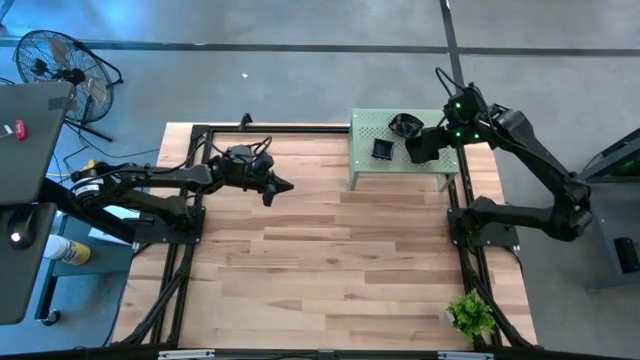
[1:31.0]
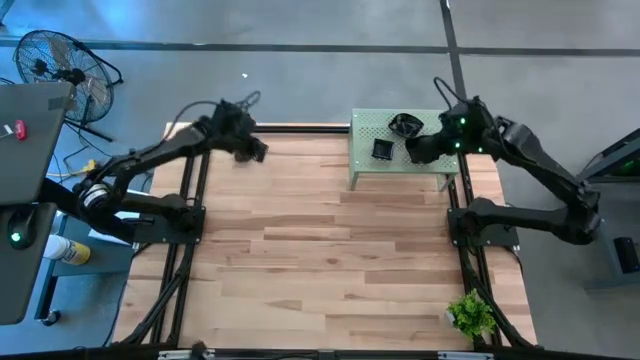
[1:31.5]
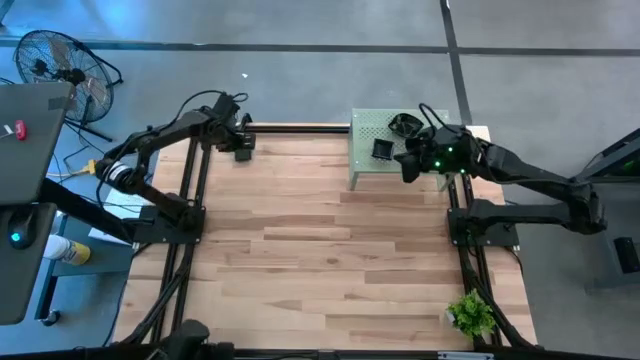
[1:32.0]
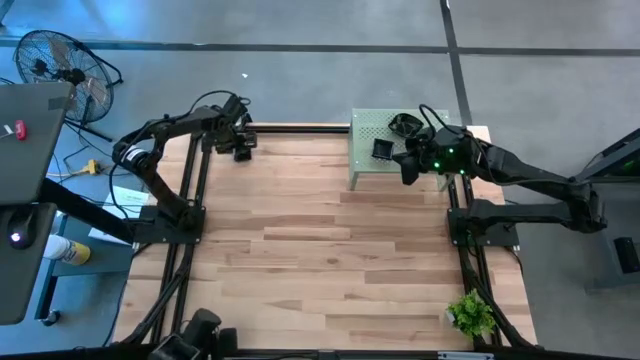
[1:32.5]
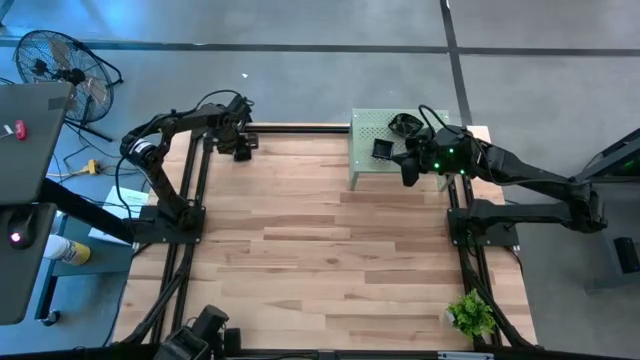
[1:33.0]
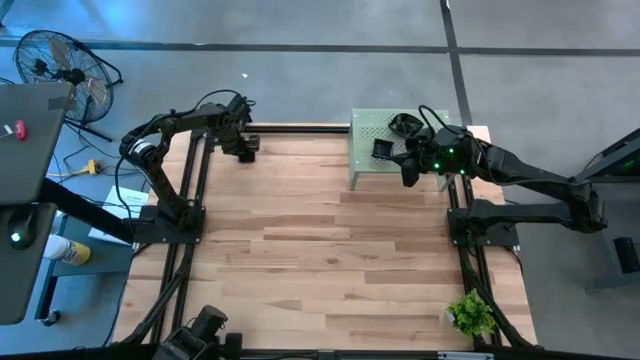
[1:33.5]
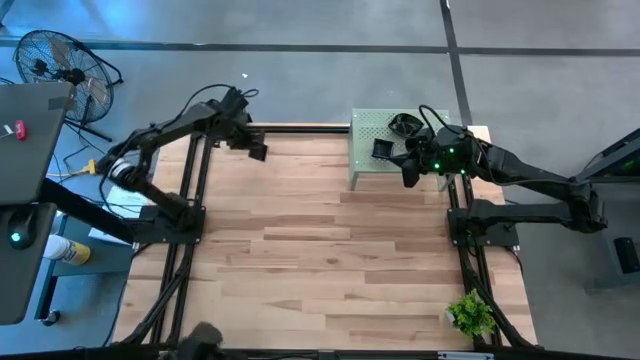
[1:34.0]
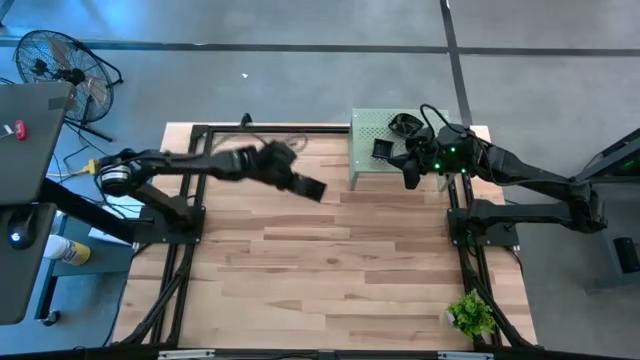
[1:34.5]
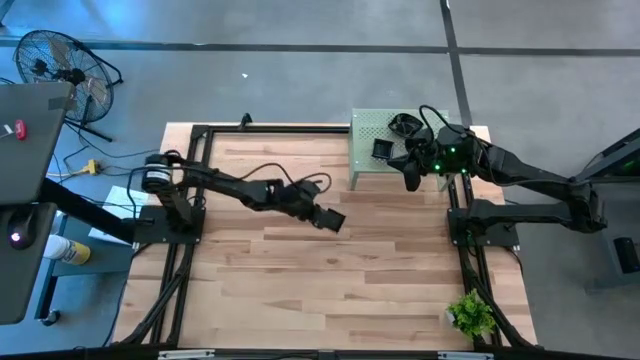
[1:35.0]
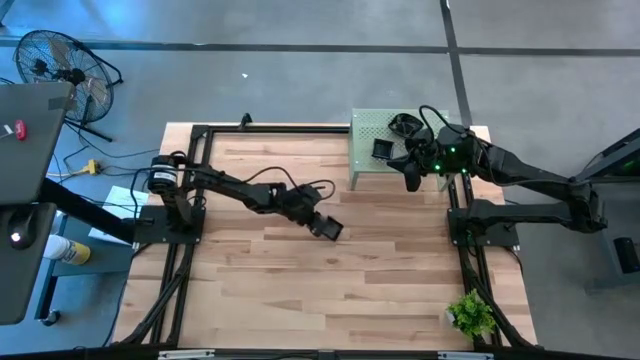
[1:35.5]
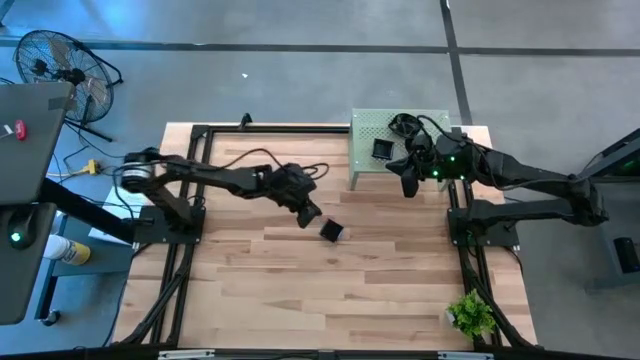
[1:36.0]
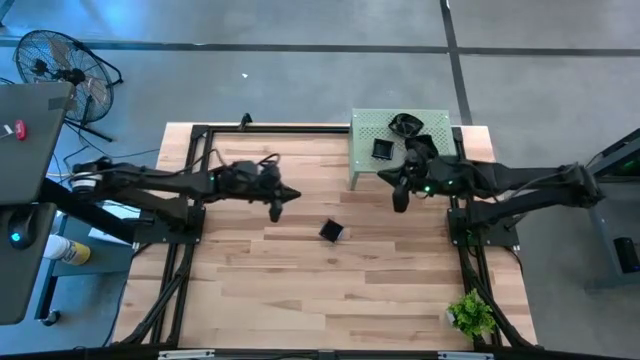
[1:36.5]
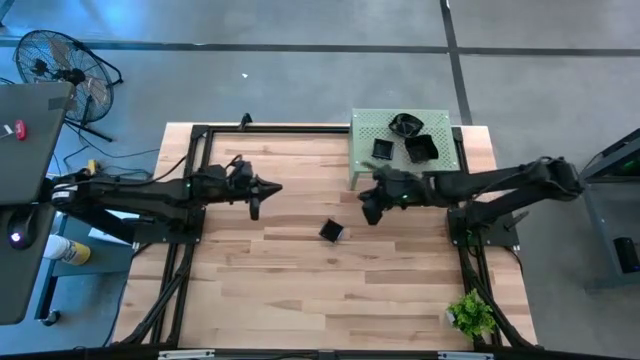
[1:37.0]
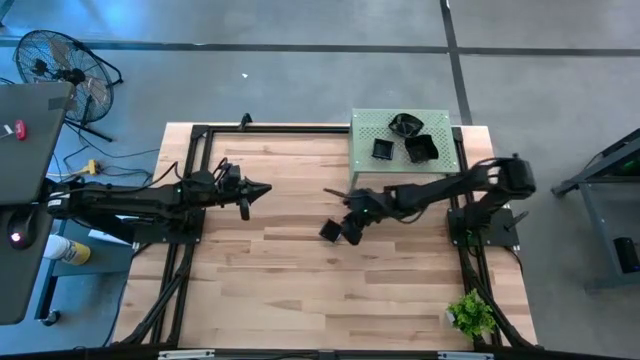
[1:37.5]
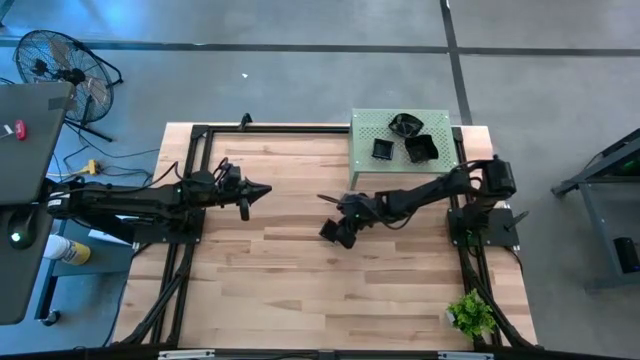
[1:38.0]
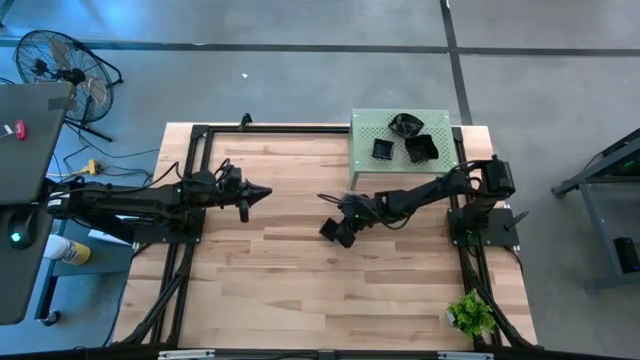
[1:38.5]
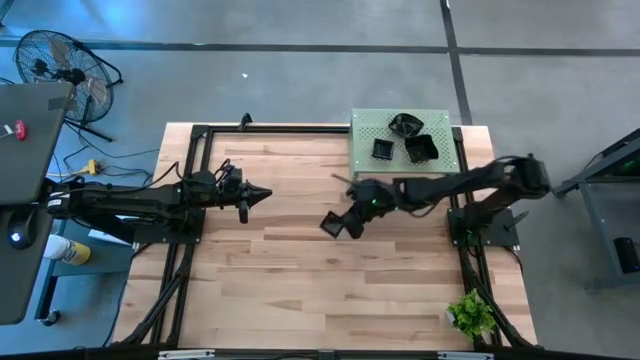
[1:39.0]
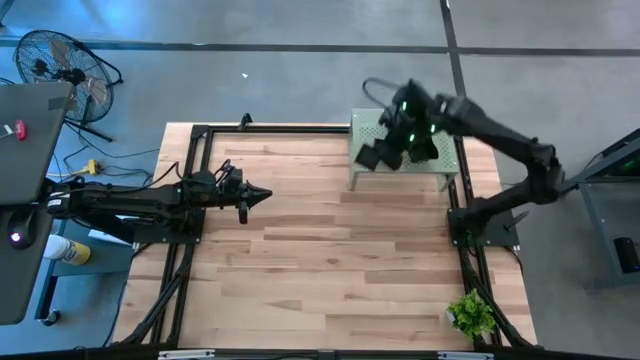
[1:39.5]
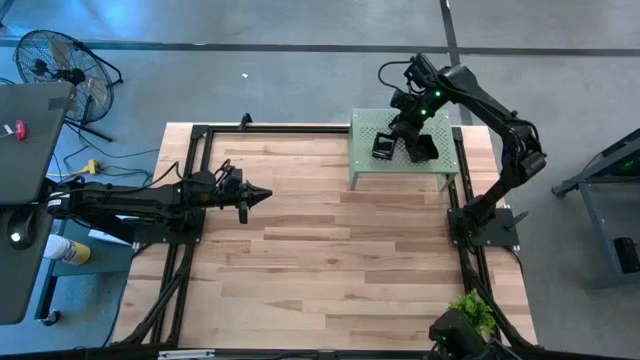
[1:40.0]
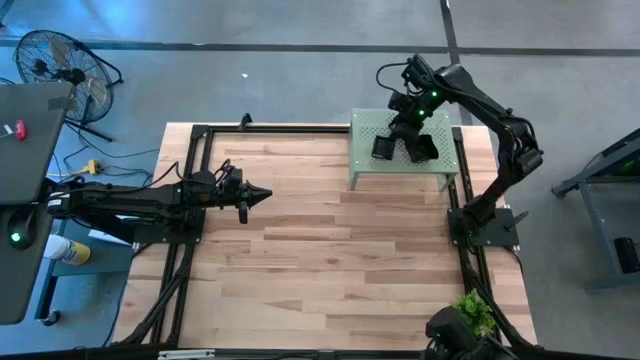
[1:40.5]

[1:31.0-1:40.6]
Task: Pick & Place Mini shaped plates
Stack the black square plate on top of the black square plate on the shelf

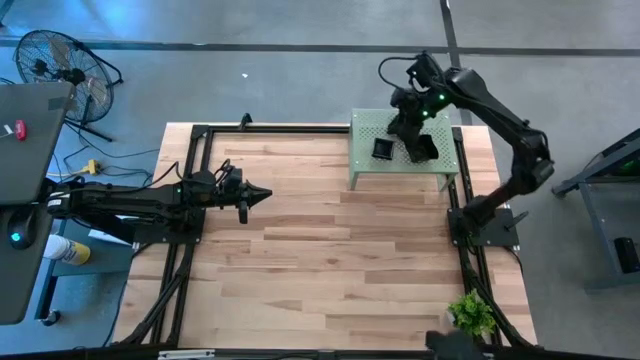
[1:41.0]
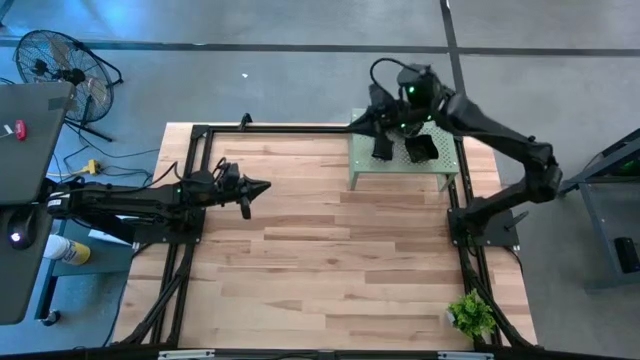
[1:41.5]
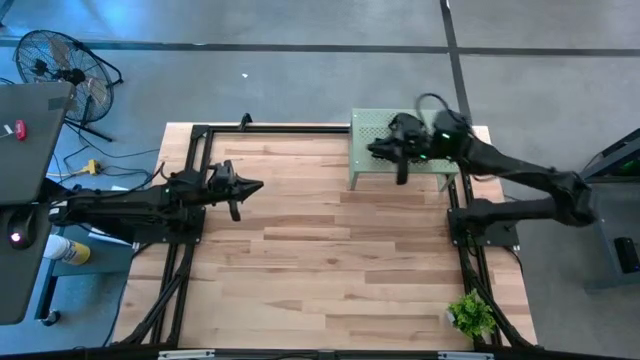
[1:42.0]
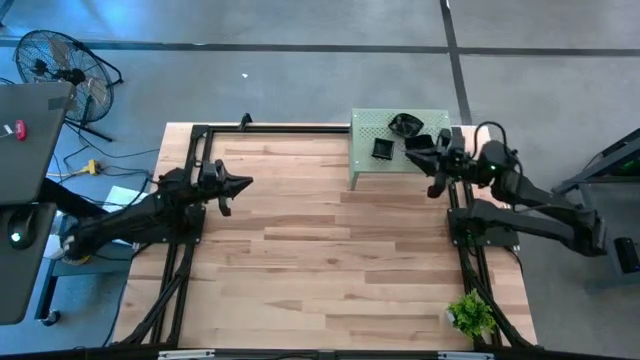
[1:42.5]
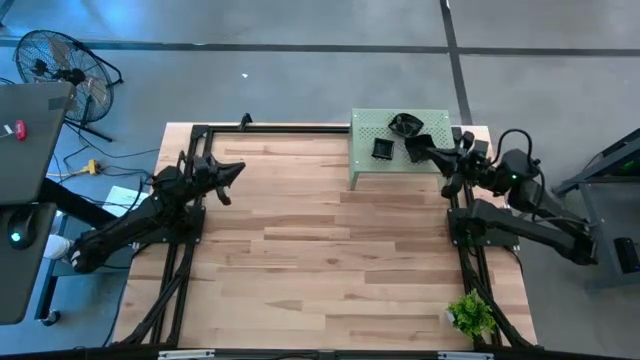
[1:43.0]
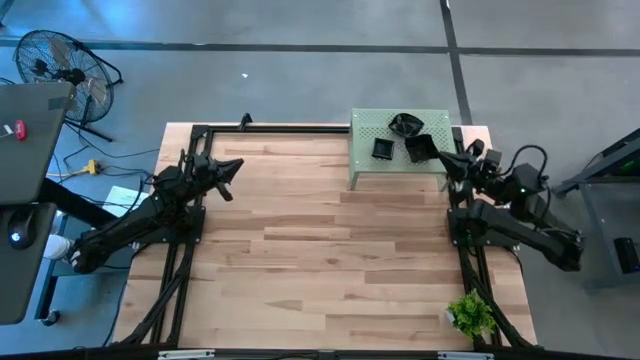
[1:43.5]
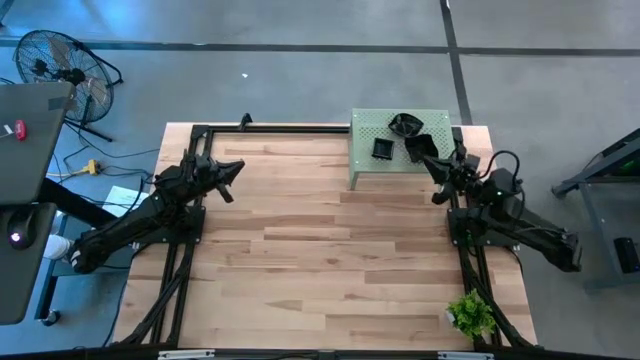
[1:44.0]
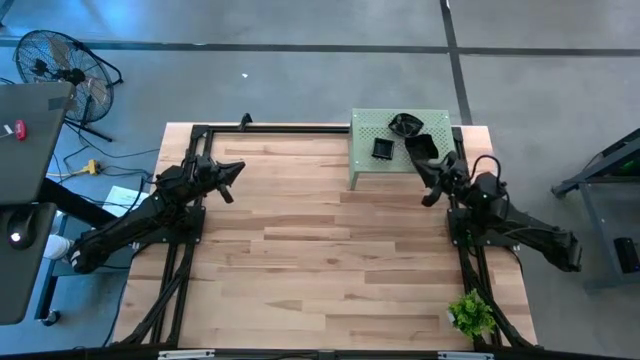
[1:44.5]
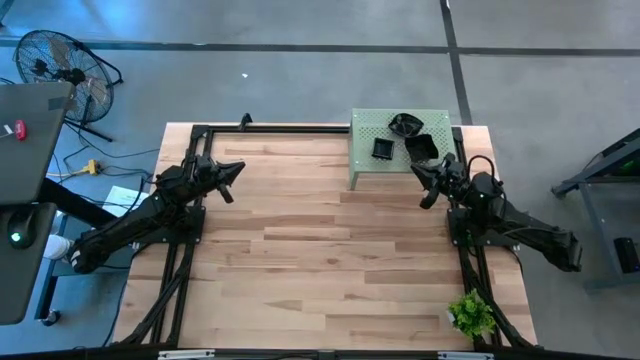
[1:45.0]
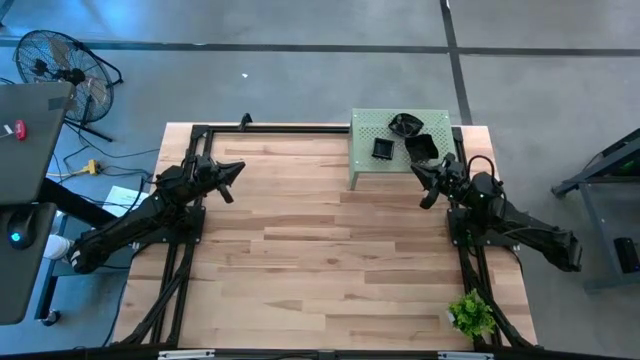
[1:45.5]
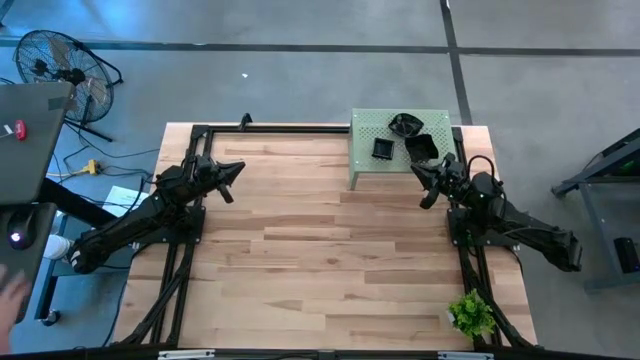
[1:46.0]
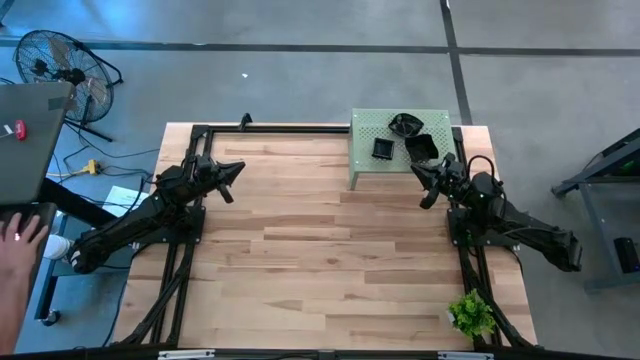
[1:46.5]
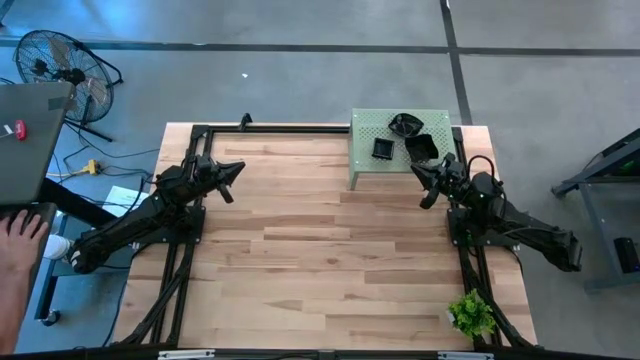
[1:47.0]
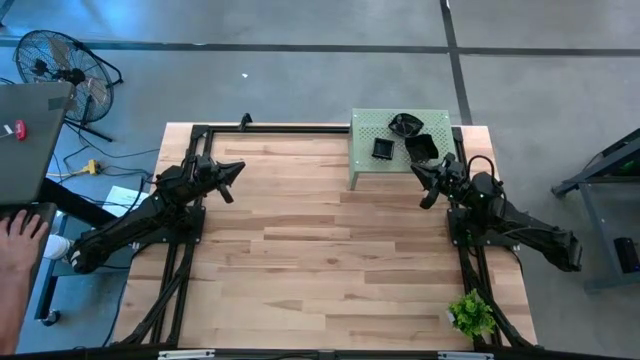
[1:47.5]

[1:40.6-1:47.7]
Return to Home Position

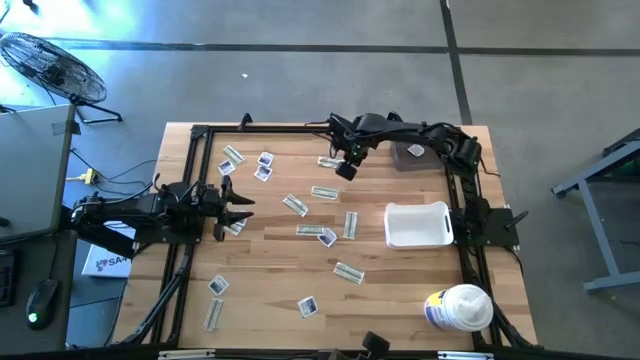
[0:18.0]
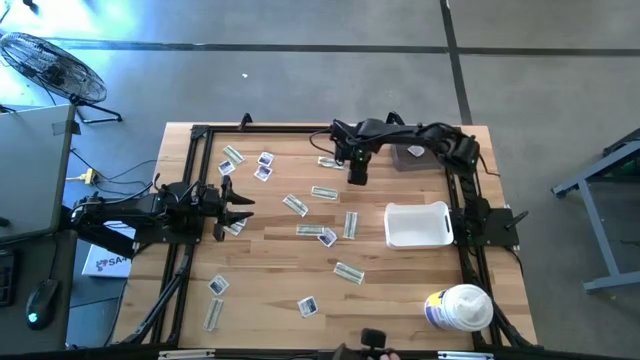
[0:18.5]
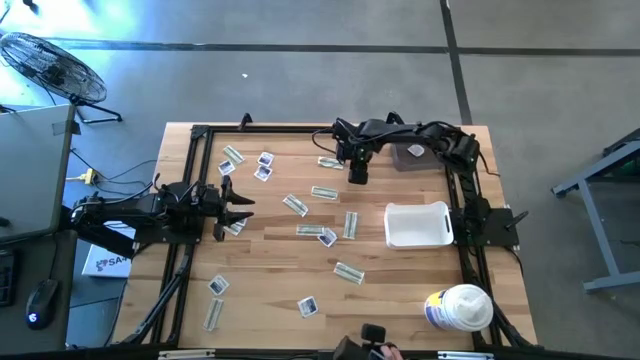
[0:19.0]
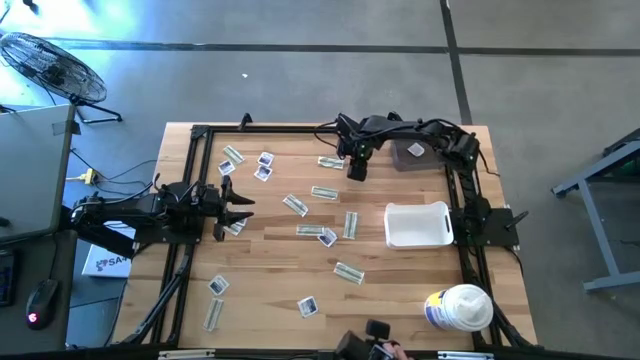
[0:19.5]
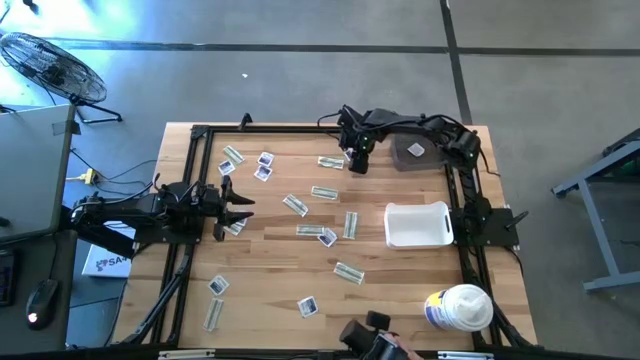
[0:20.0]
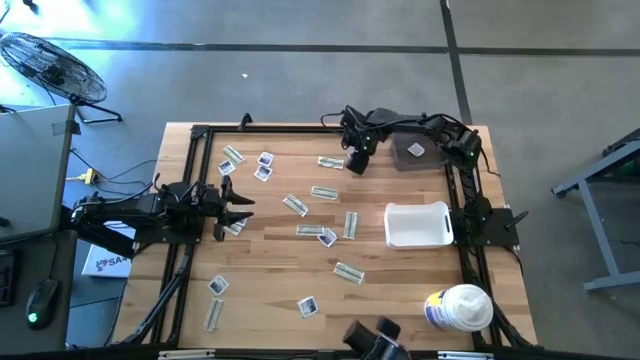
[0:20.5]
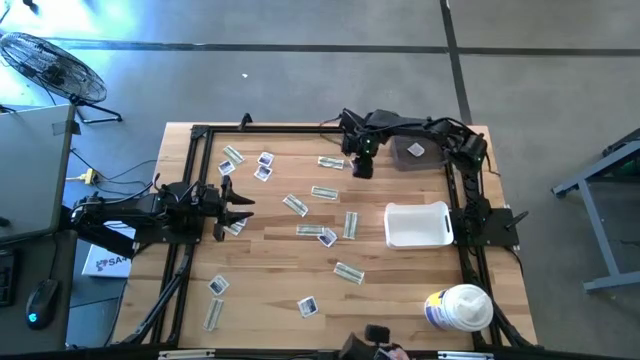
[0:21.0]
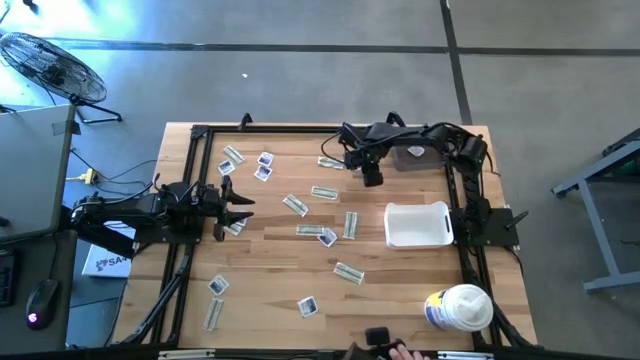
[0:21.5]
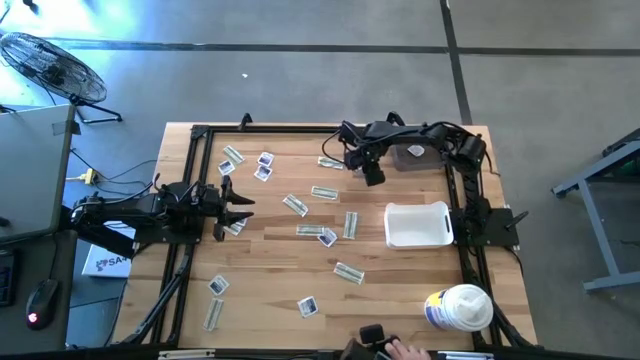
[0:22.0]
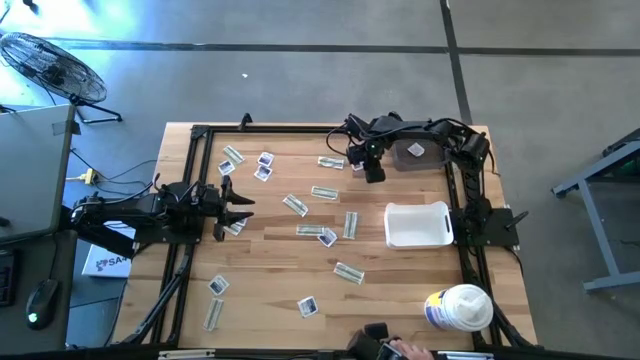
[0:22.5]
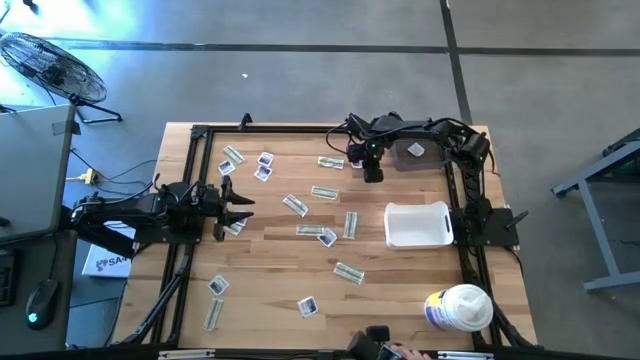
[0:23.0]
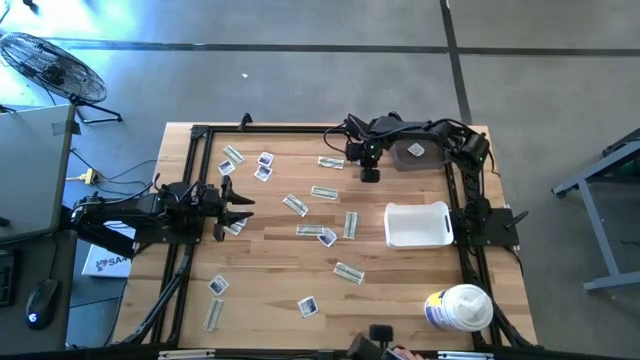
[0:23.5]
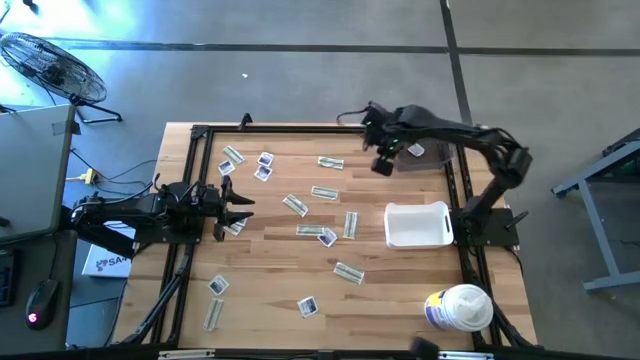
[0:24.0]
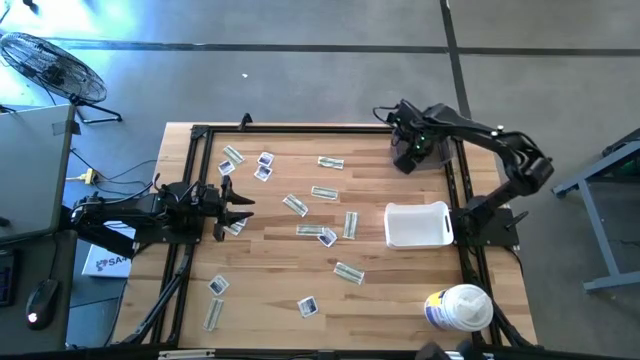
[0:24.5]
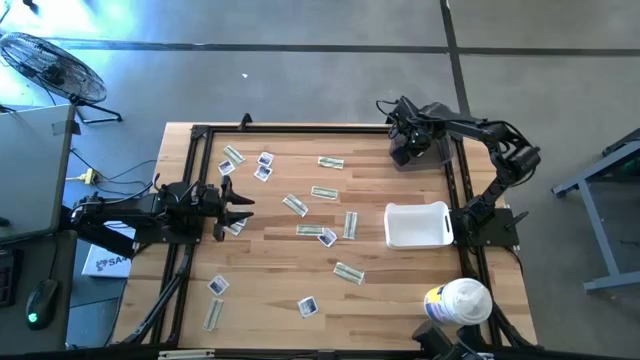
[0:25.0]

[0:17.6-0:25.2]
Task: Pick & Place First Aid Supplies
Put the alcohol pad into the black bin
